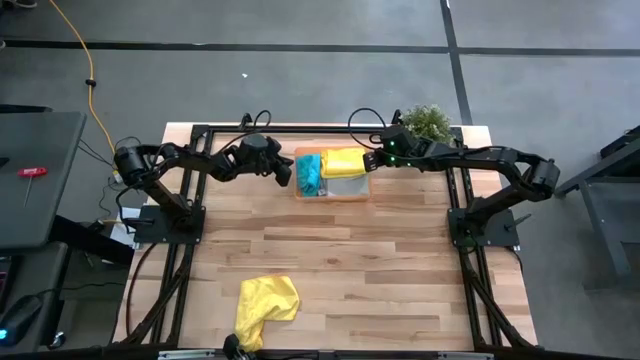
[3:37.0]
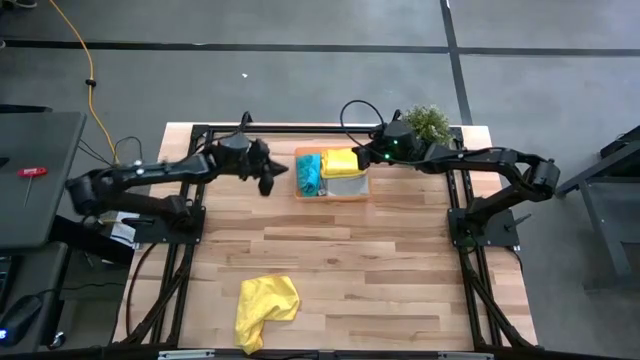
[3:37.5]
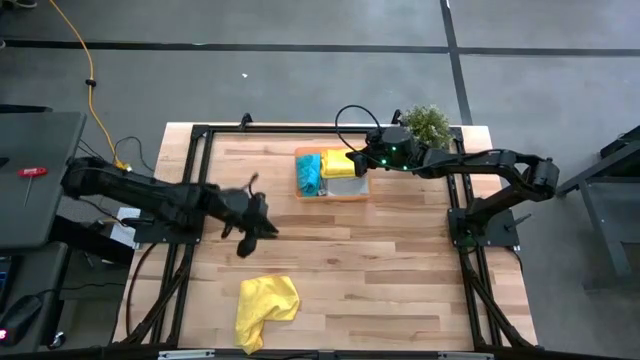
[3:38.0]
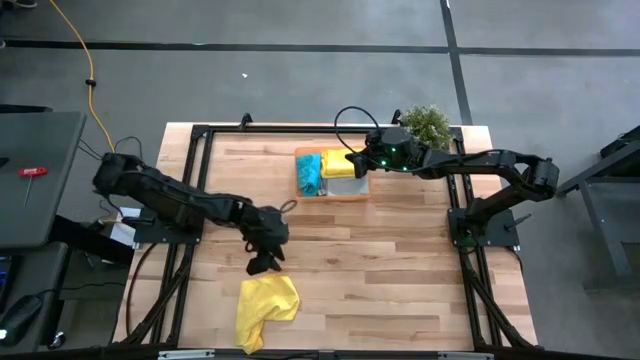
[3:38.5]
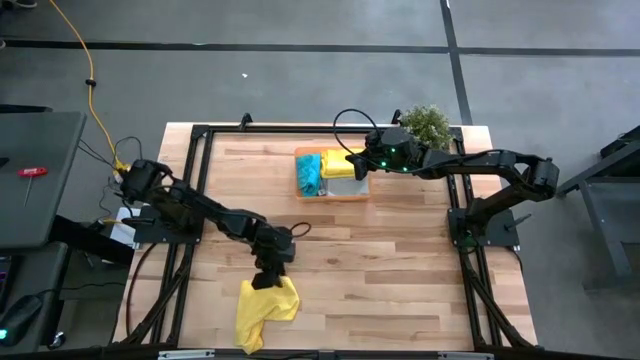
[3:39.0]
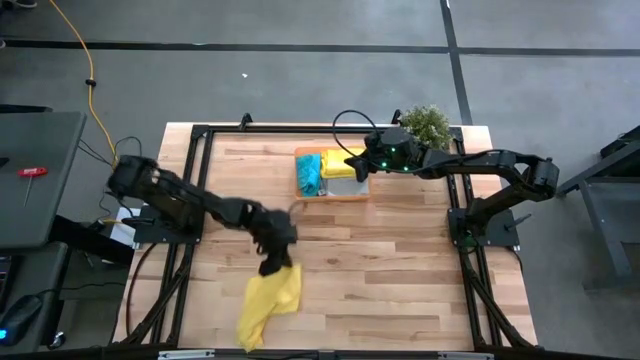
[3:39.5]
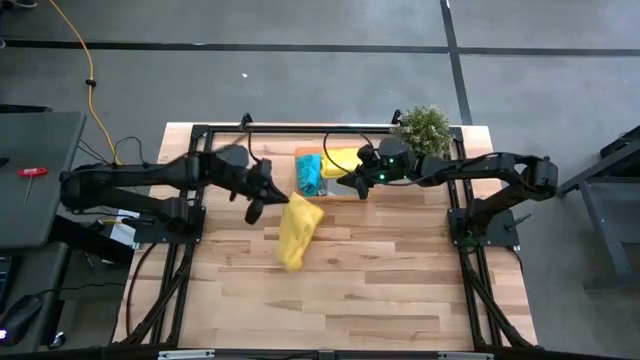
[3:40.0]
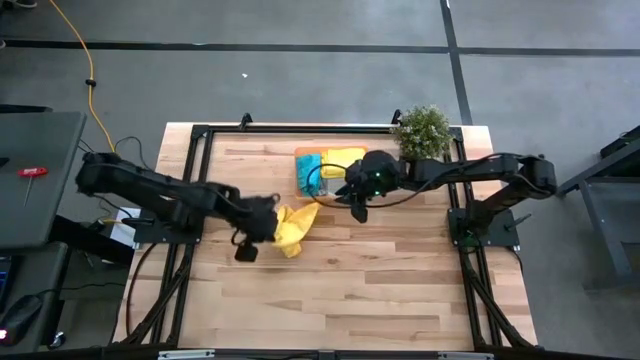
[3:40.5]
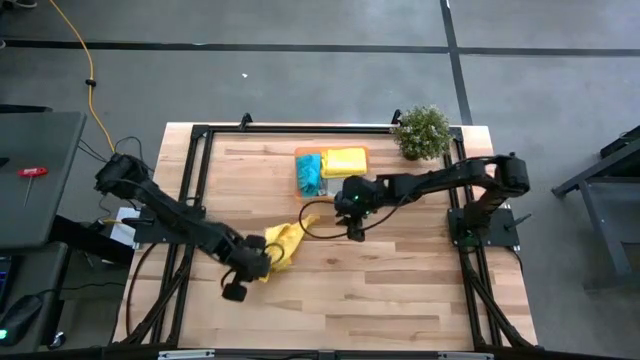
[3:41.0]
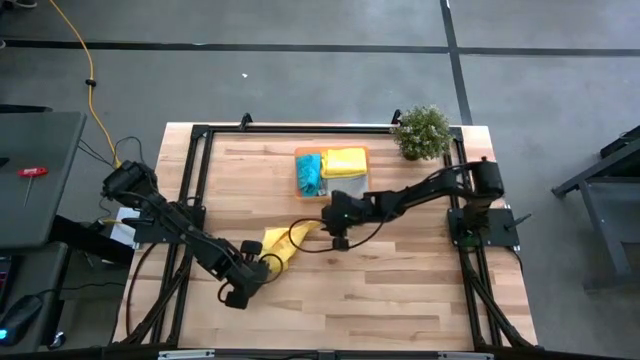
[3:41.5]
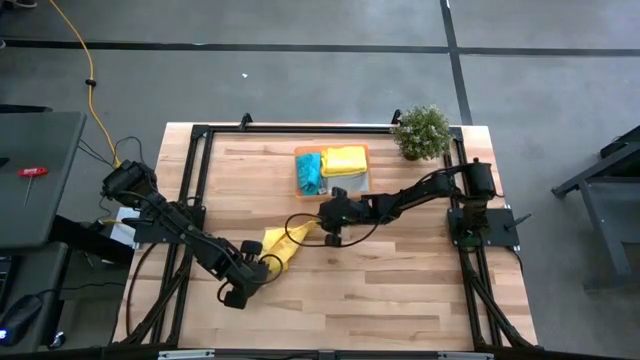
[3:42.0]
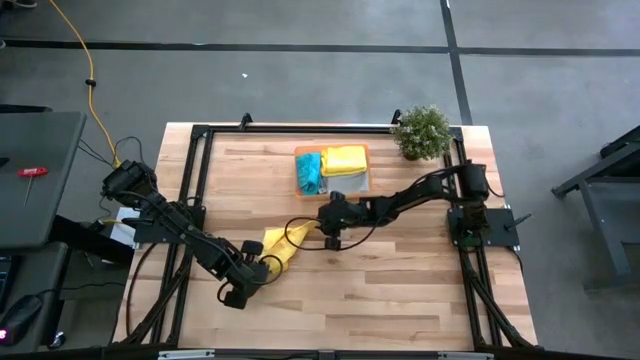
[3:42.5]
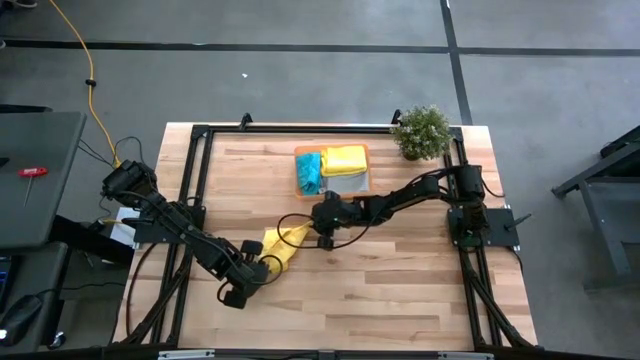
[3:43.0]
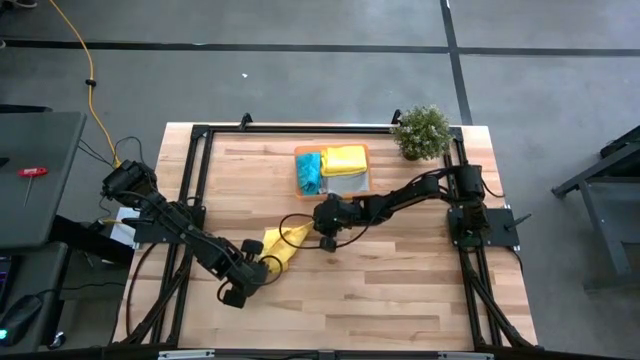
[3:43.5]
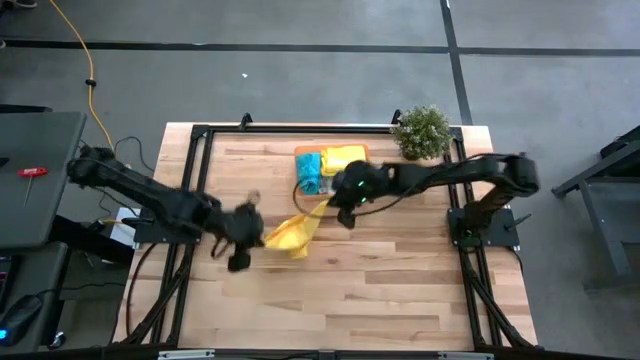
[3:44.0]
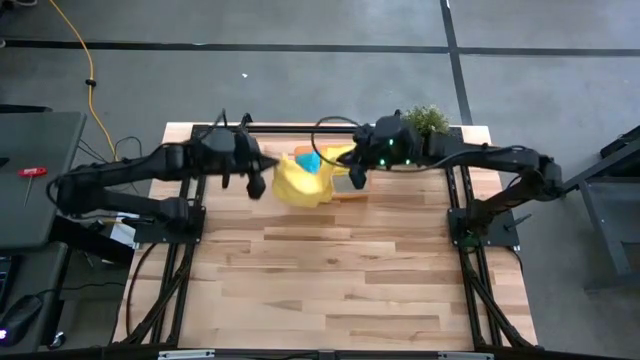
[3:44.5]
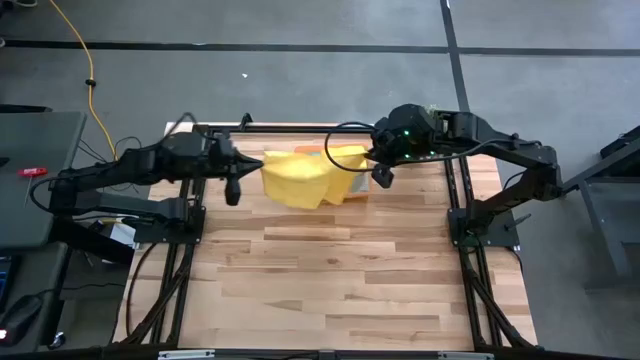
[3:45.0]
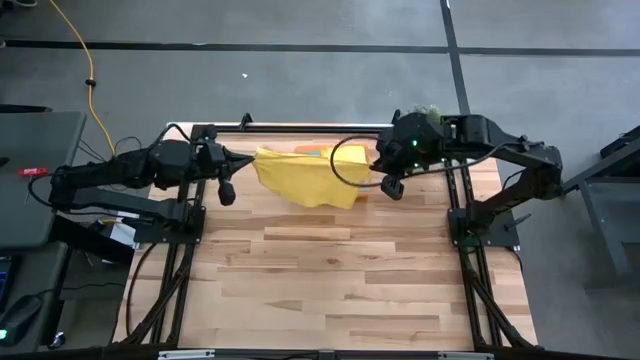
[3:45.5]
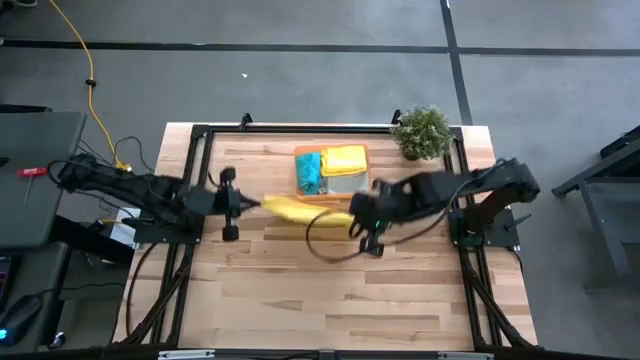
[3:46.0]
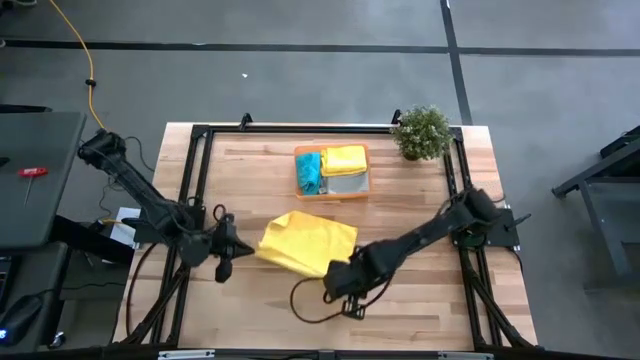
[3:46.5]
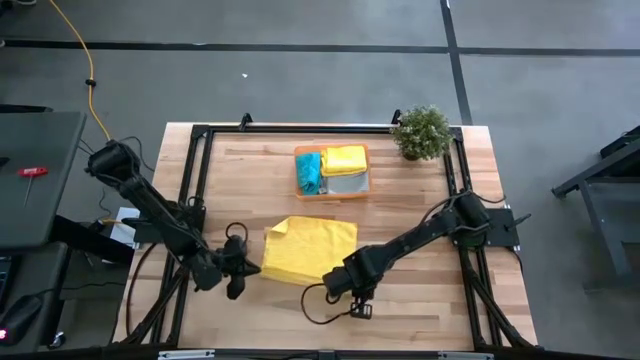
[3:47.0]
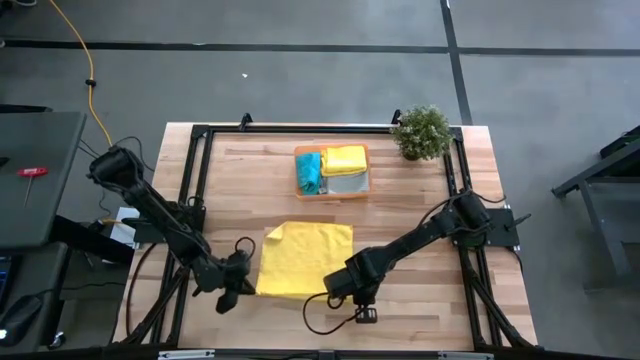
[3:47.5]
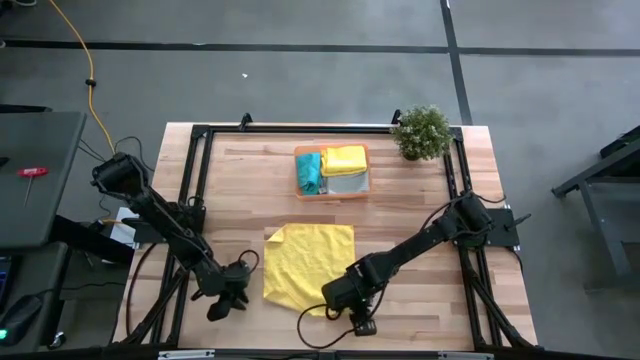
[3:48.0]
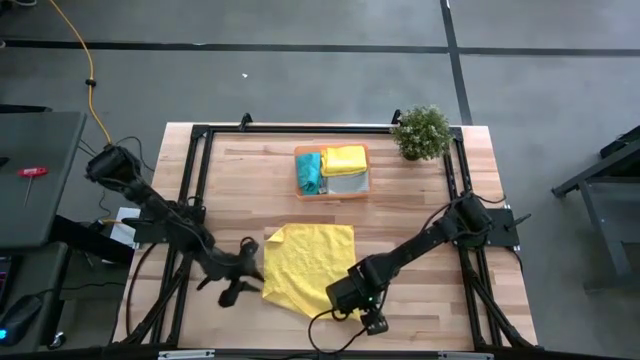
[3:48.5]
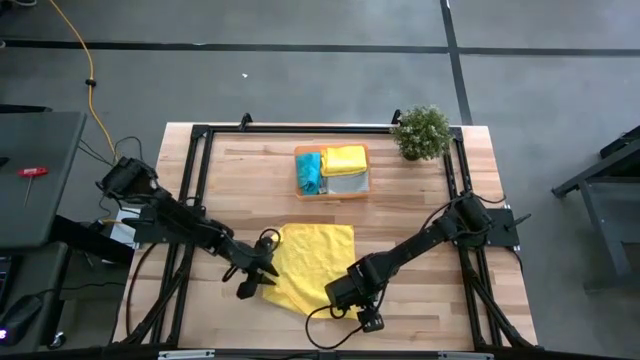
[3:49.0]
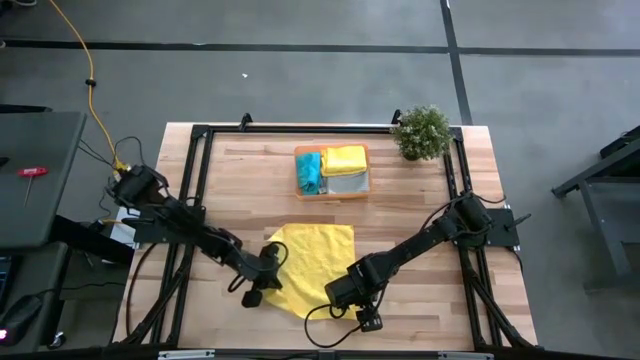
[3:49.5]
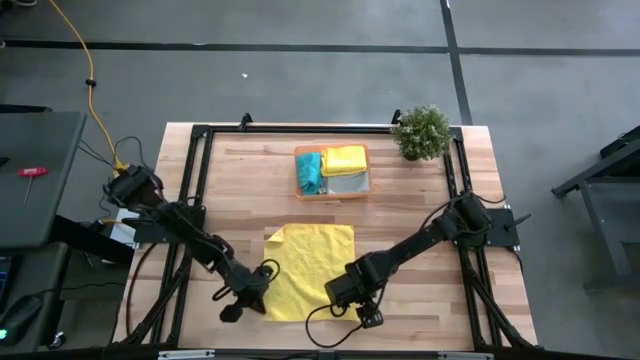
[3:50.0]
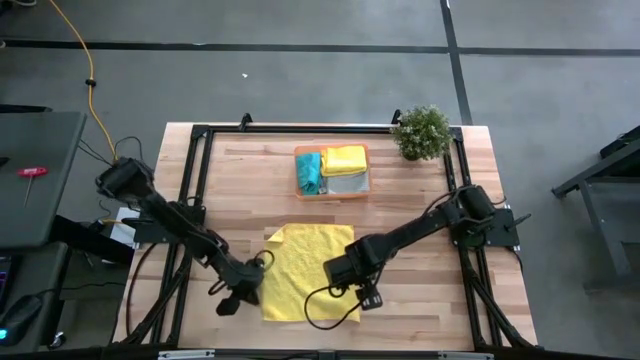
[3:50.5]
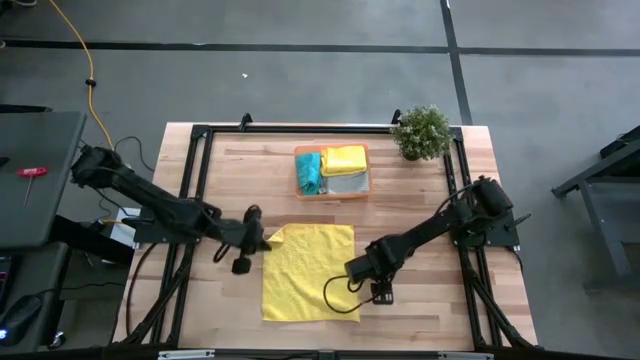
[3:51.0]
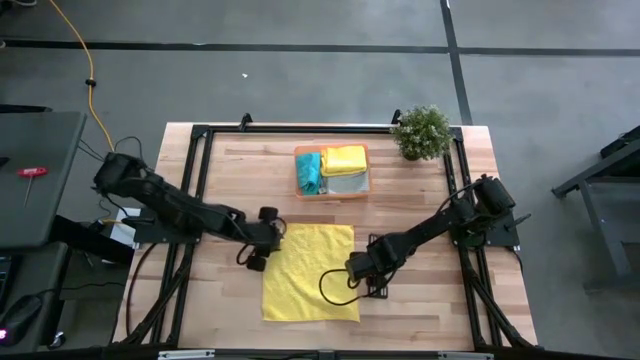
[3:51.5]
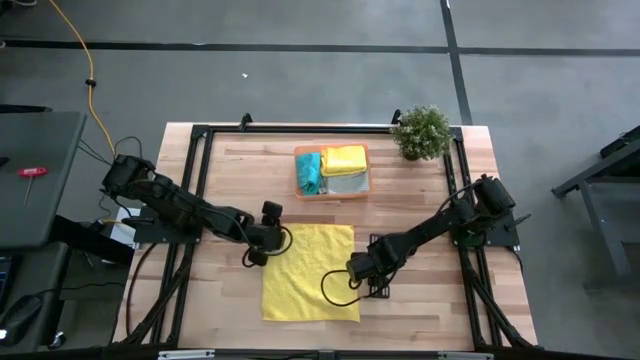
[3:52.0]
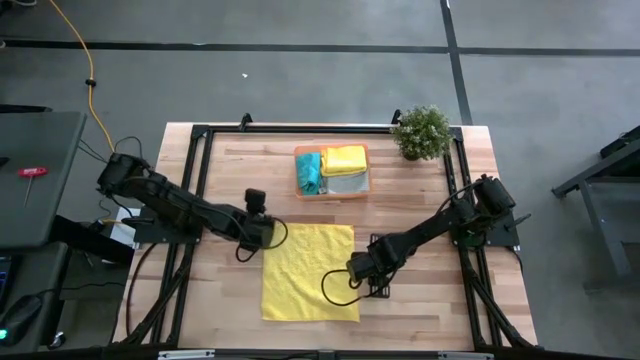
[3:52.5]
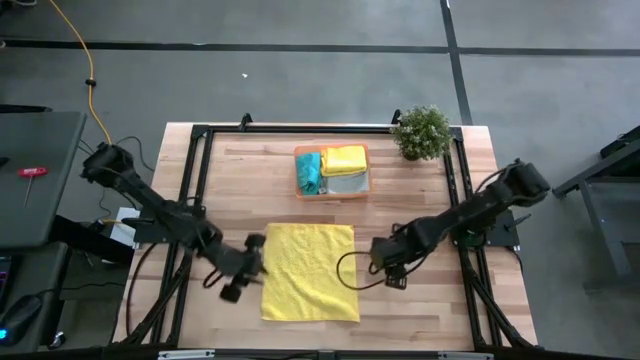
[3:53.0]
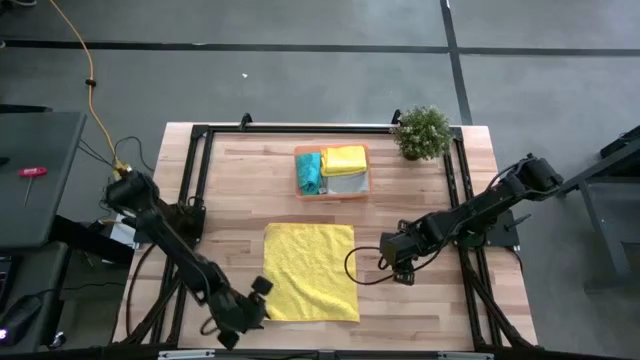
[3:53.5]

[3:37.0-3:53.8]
Task: Fold microfiber towels
Fold the yellow towel
